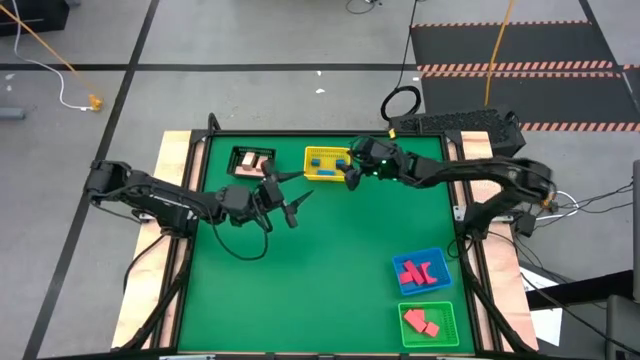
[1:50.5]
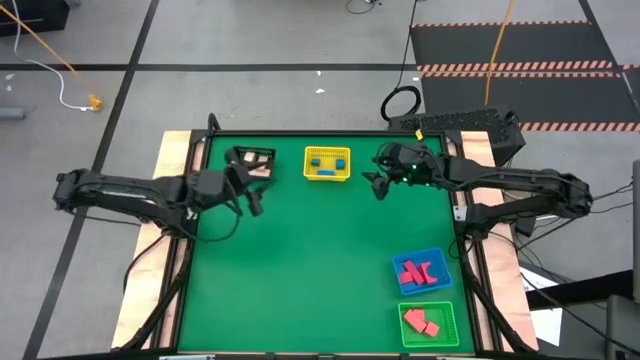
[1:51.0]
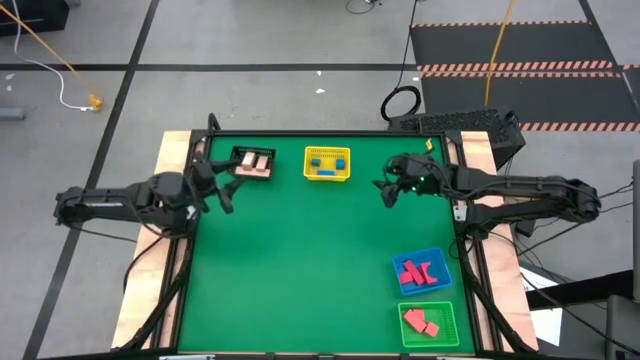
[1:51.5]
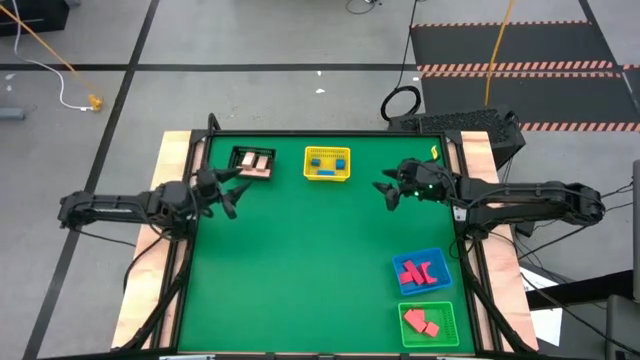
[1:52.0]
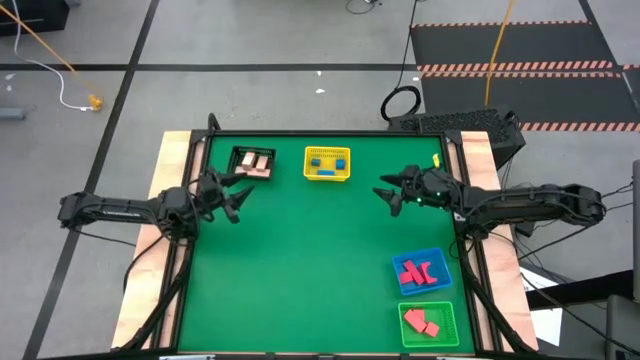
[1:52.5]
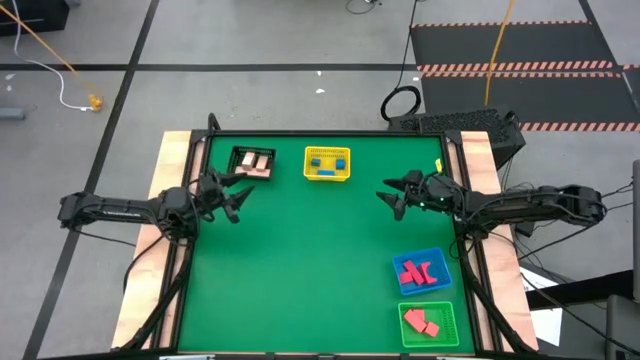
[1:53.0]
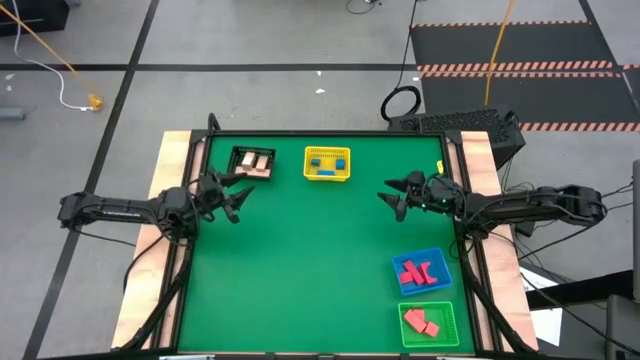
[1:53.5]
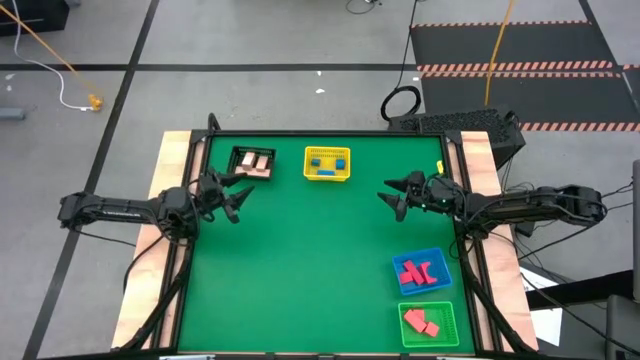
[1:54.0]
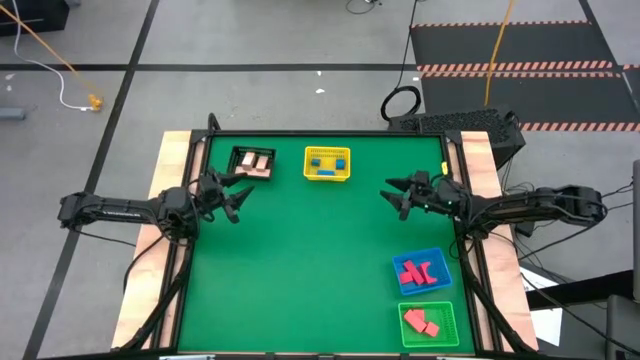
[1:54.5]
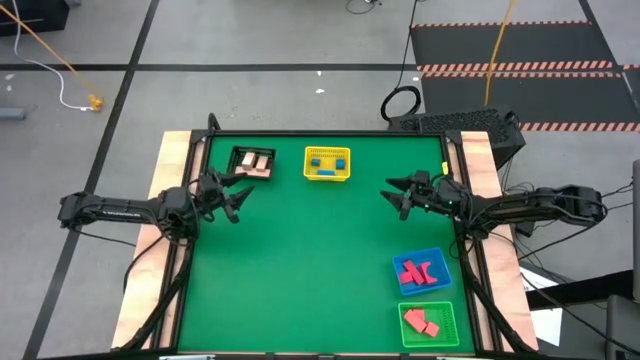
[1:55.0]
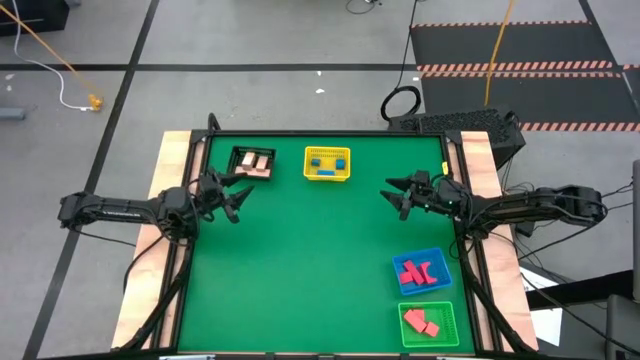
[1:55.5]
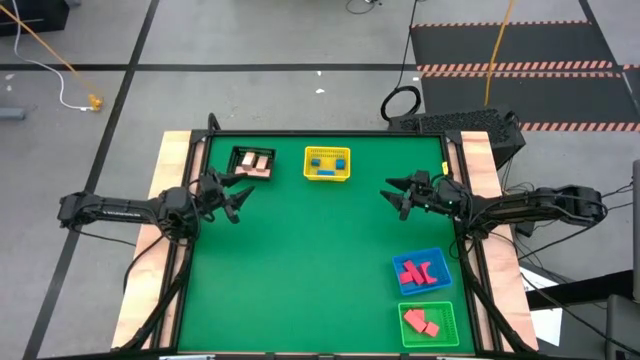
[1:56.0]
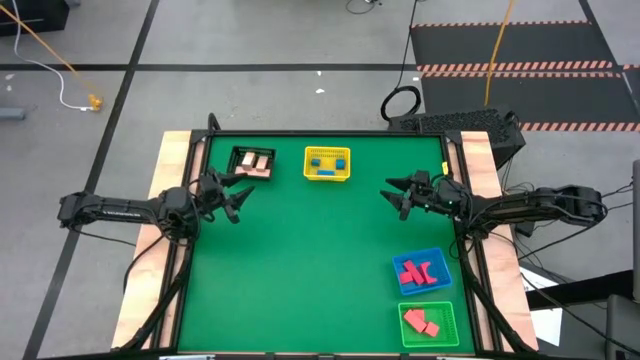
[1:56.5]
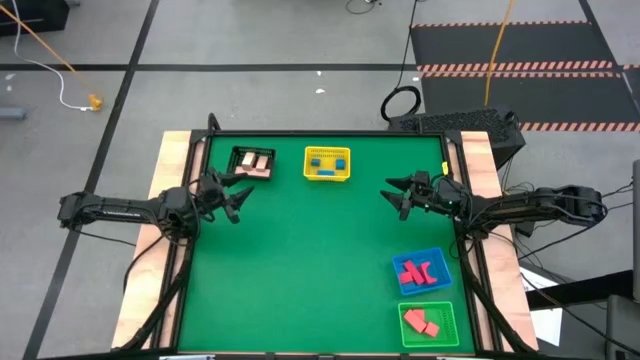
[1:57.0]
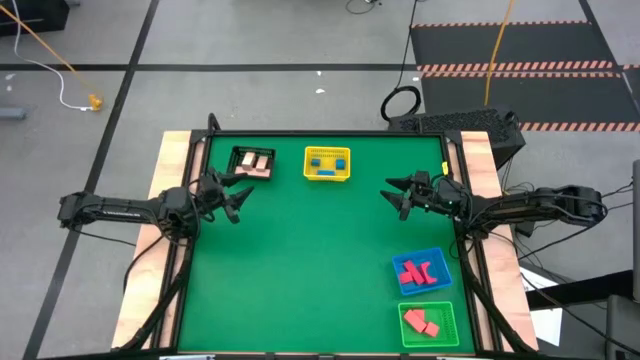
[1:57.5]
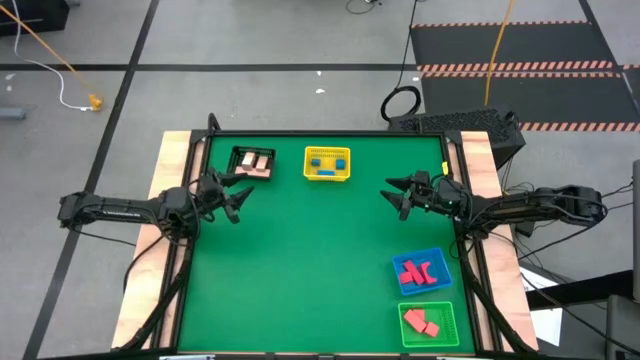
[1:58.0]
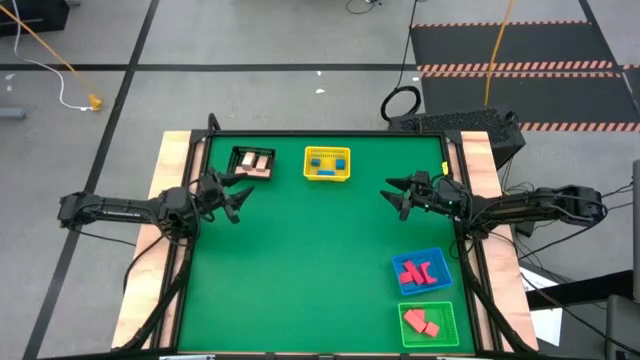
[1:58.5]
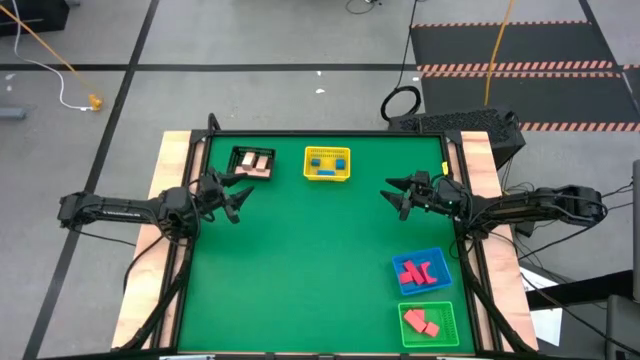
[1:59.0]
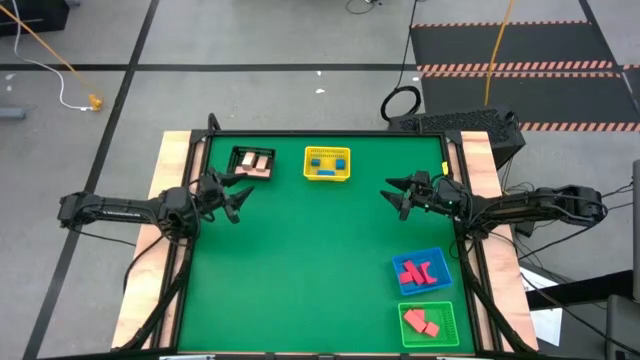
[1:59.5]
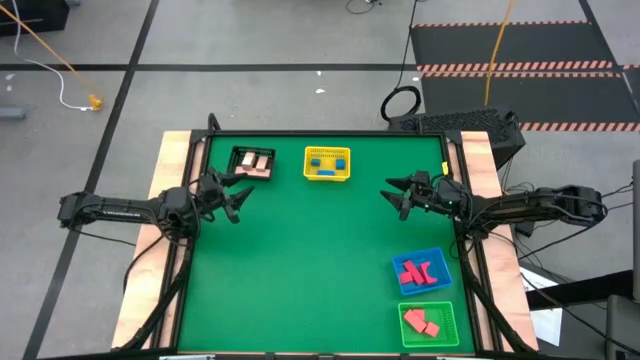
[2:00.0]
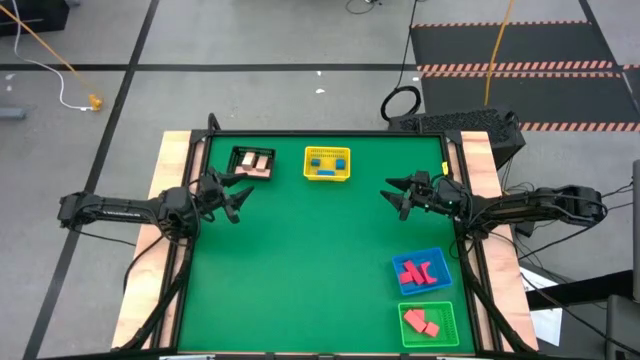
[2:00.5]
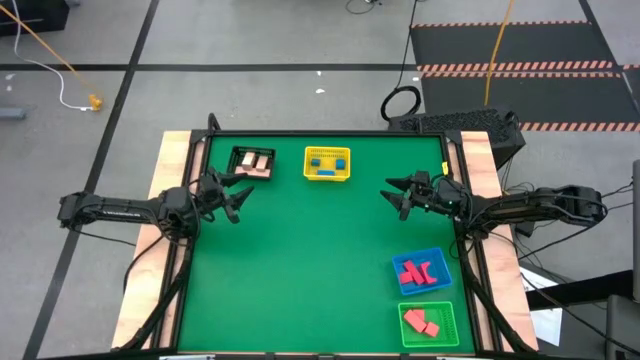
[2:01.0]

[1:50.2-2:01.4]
Task: Sort & place blocks by color
Return to Home Position

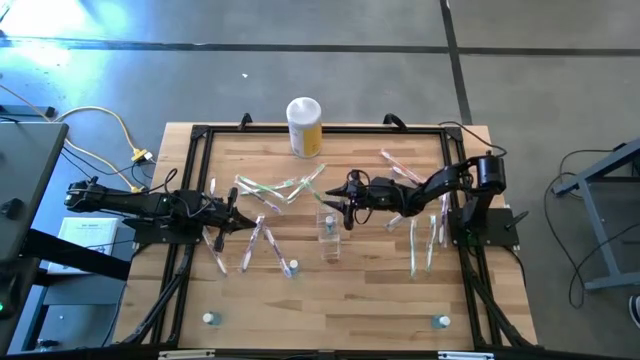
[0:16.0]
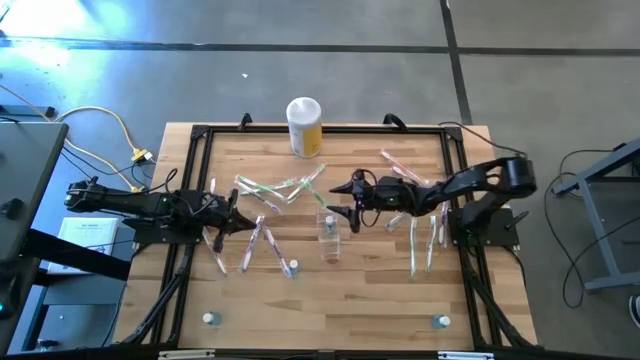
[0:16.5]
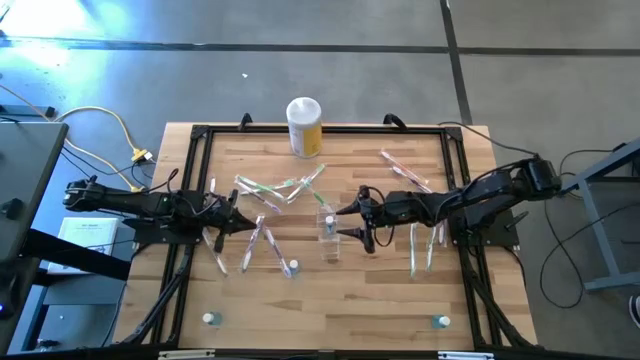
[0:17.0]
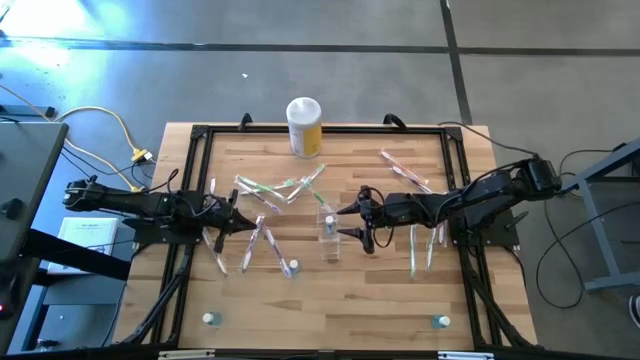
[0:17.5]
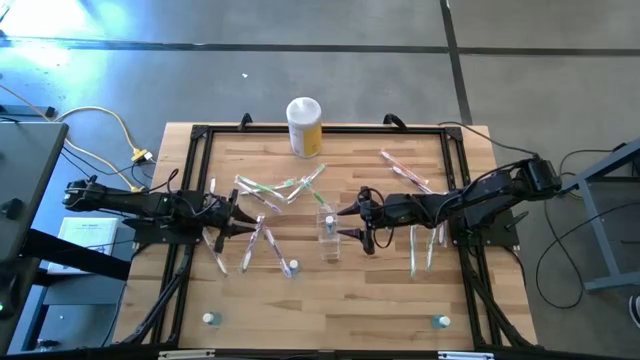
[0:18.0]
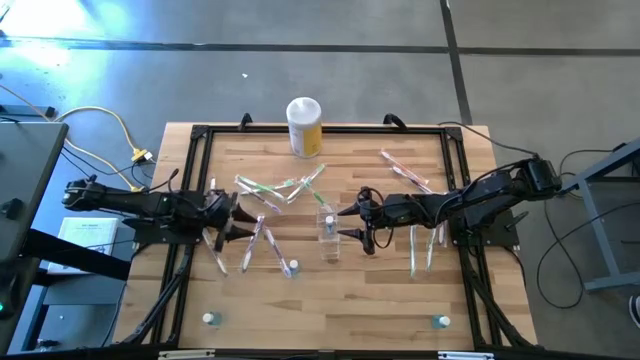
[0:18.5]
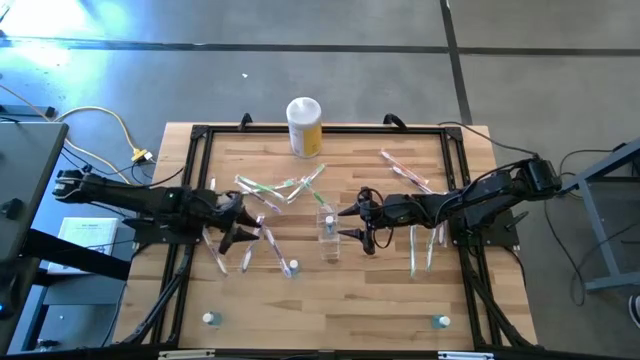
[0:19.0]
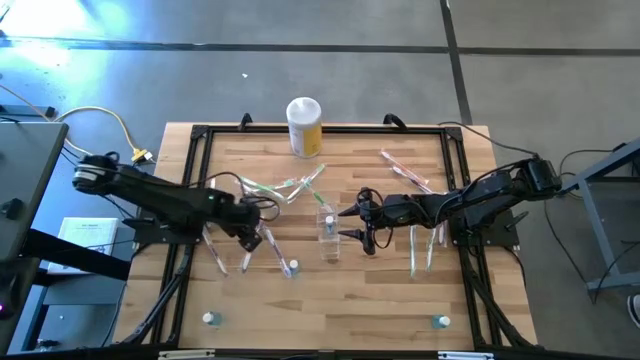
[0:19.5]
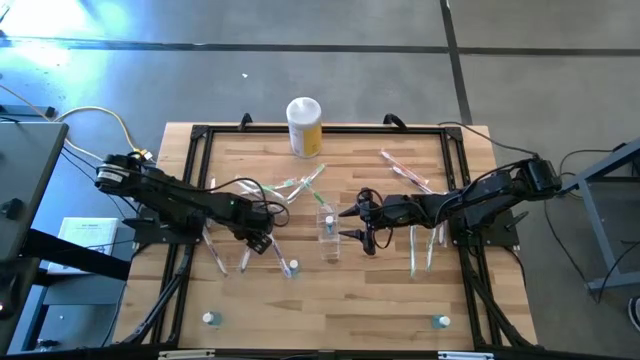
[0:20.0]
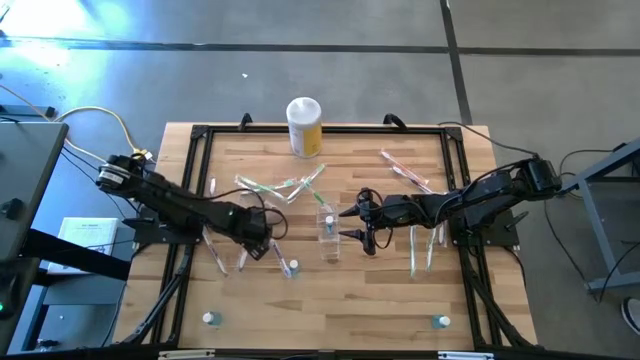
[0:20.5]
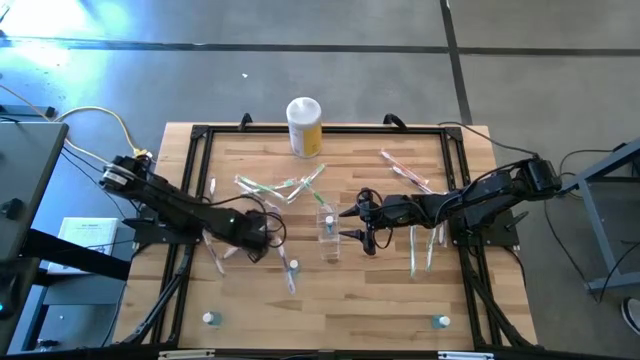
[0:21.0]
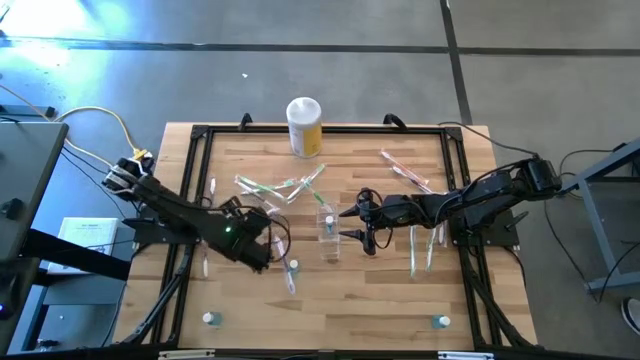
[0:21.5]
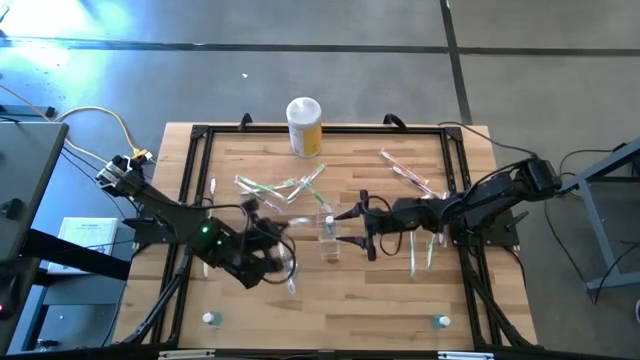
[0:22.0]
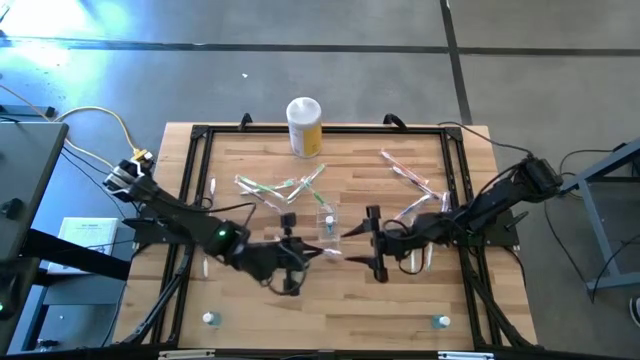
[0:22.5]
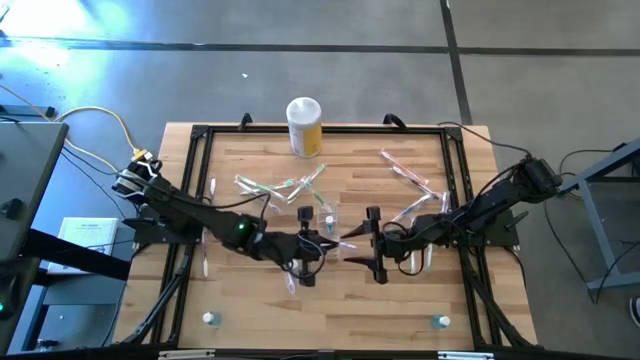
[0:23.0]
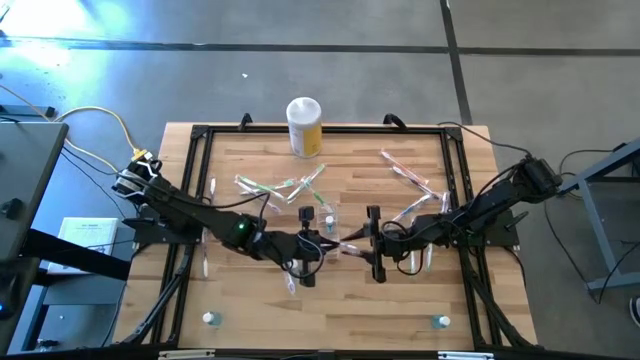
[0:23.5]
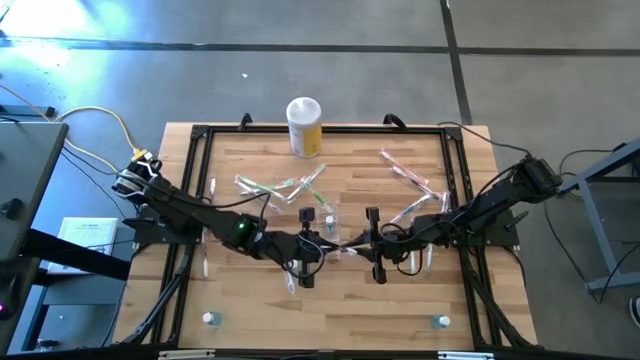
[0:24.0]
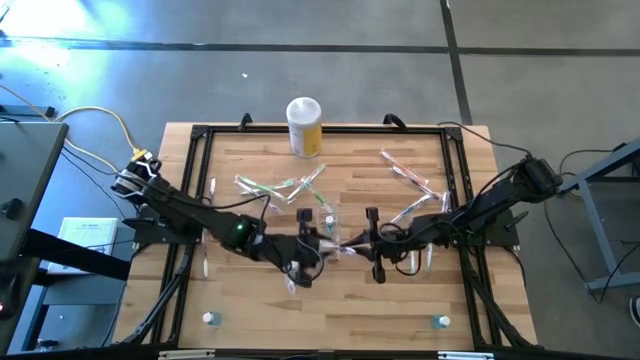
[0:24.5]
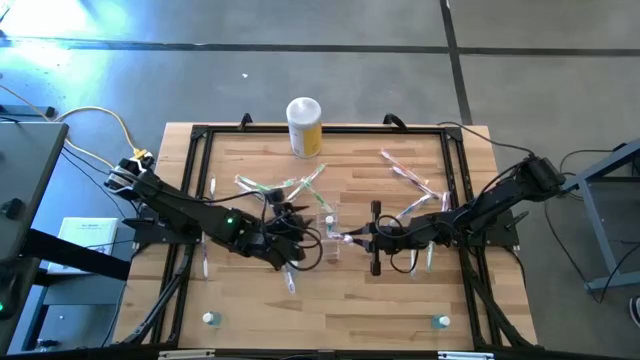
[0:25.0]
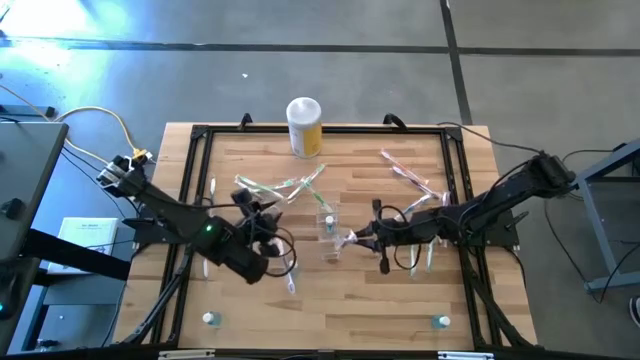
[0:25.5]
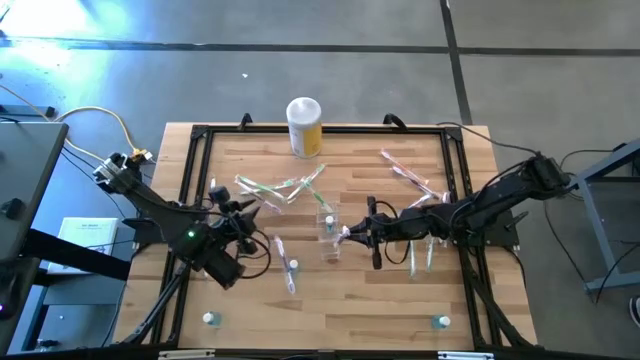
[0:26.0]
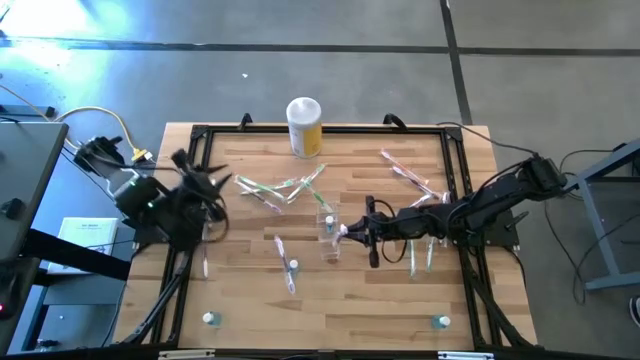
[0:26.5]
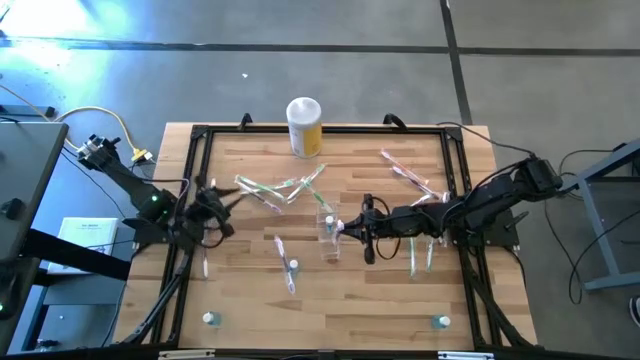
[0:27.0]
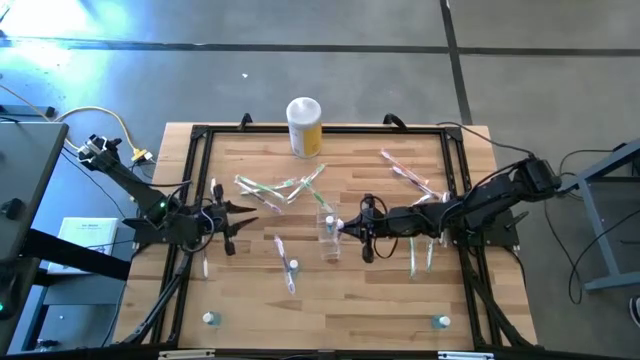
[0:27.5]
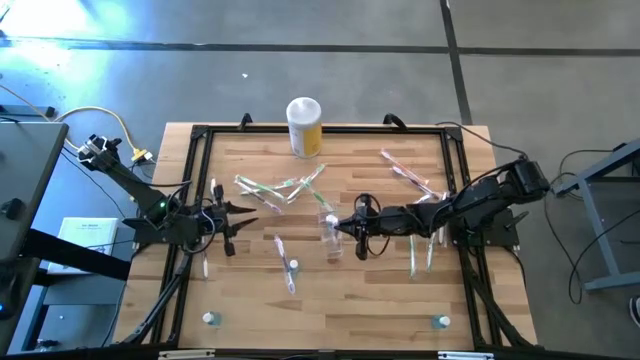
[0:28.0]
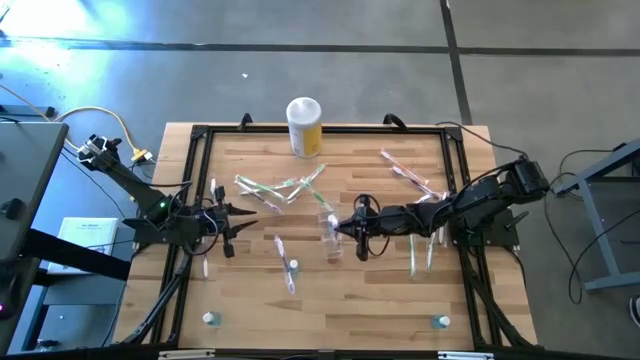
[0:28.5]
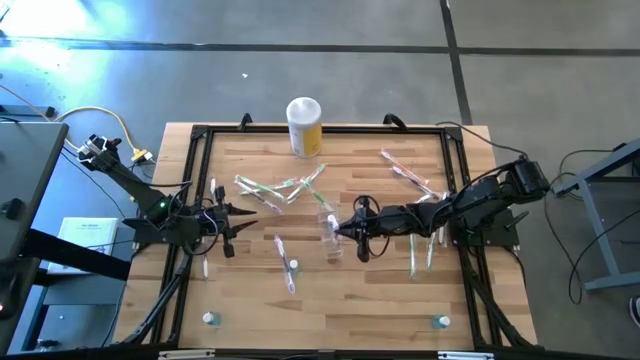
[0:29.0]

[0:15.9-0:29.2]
Task: Pick & Place toothbrushing station
Put the purple toothbrush into the transparent organizer
